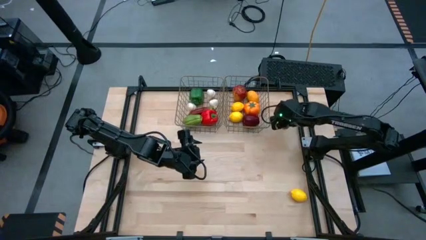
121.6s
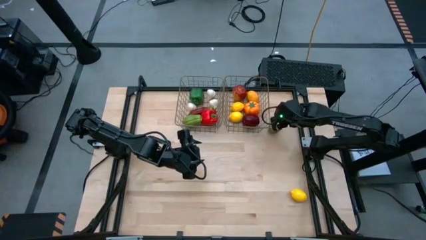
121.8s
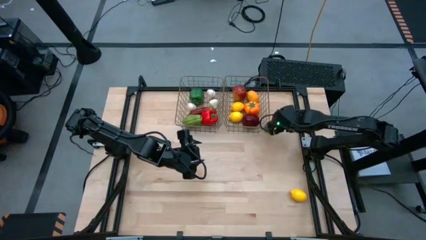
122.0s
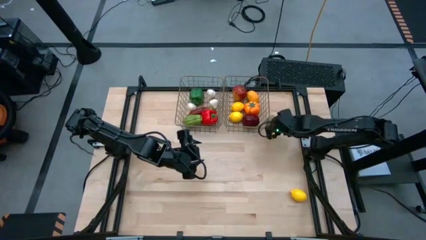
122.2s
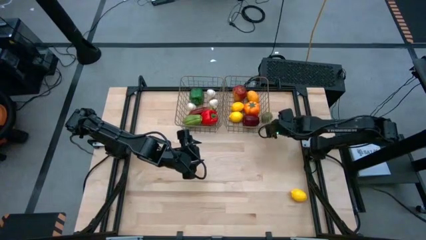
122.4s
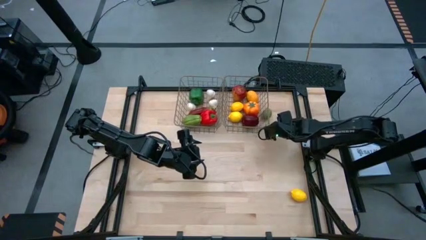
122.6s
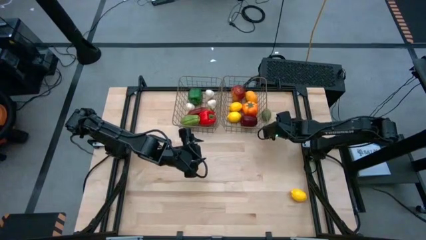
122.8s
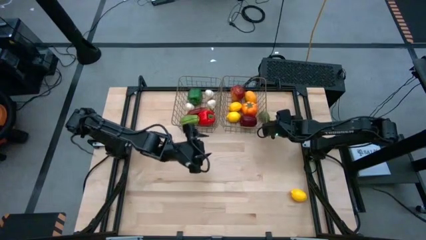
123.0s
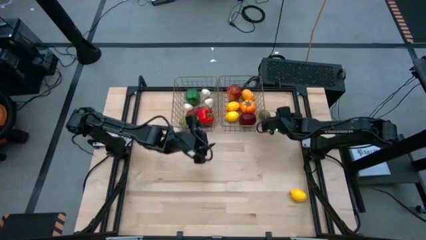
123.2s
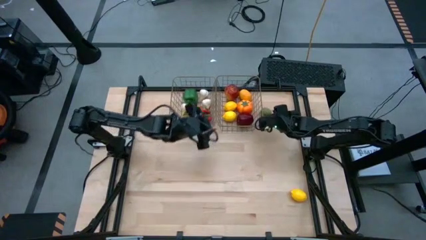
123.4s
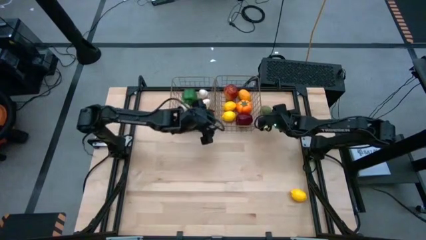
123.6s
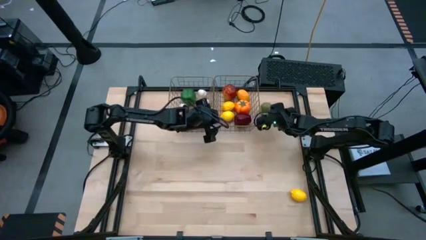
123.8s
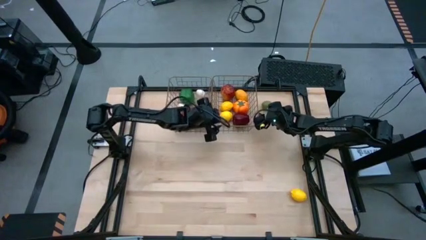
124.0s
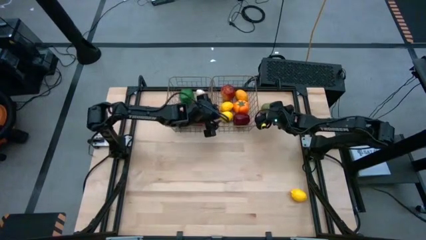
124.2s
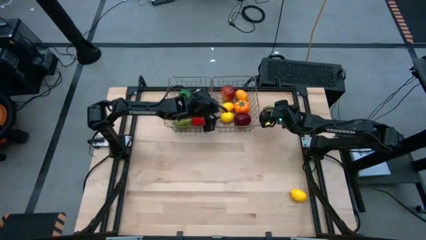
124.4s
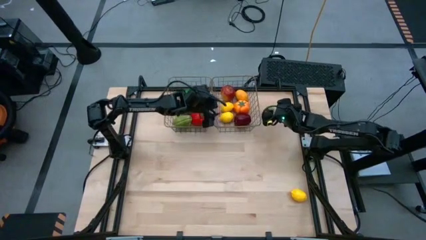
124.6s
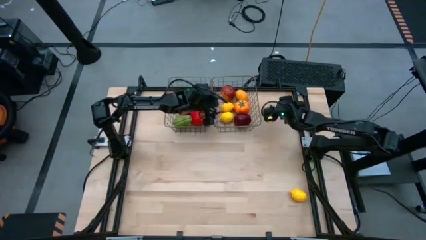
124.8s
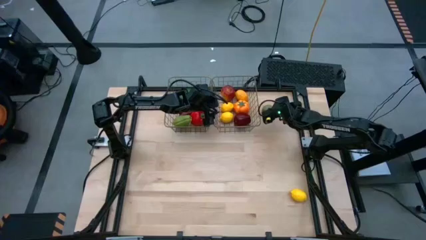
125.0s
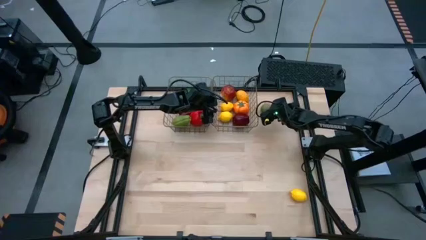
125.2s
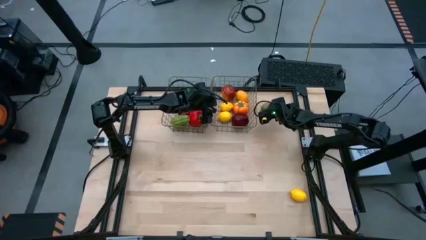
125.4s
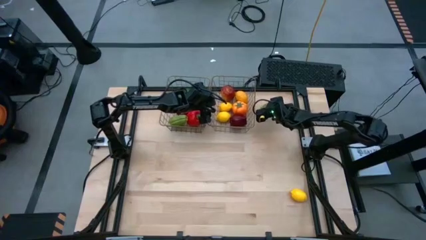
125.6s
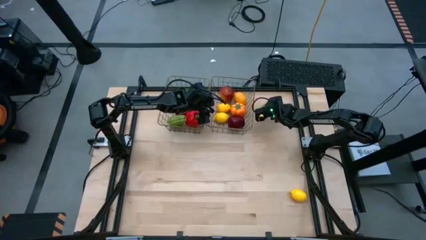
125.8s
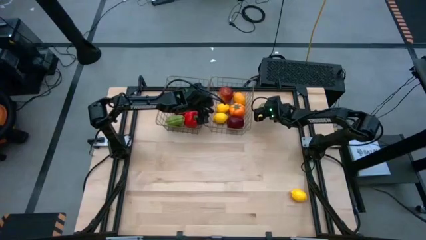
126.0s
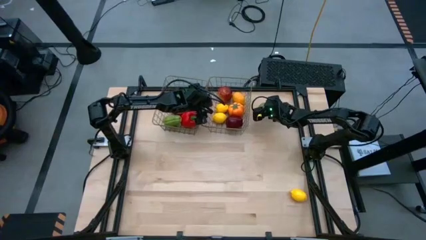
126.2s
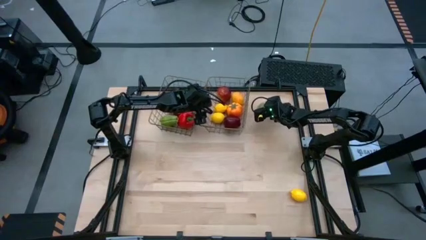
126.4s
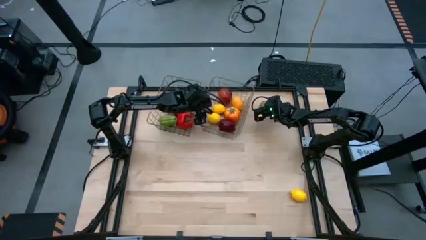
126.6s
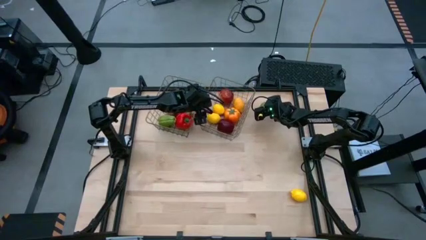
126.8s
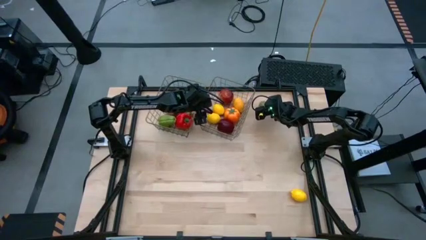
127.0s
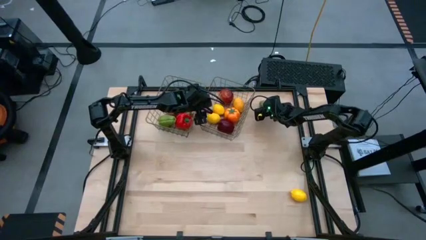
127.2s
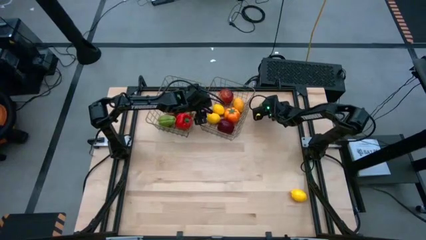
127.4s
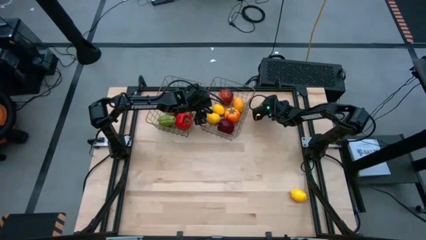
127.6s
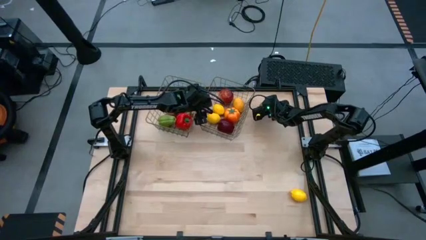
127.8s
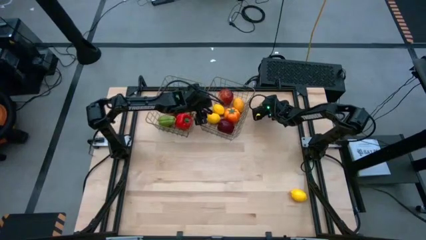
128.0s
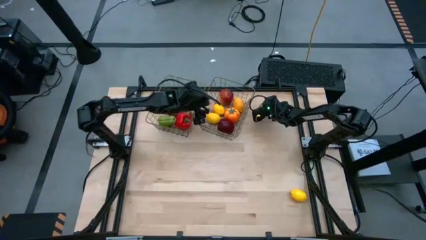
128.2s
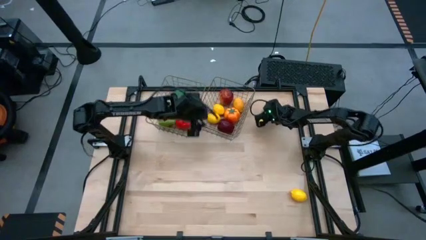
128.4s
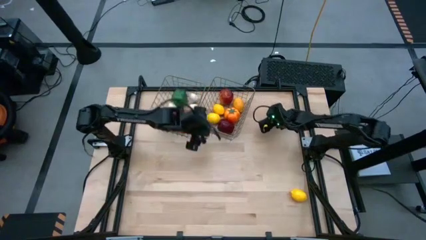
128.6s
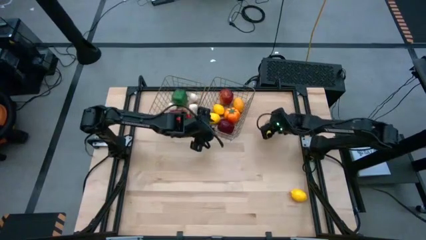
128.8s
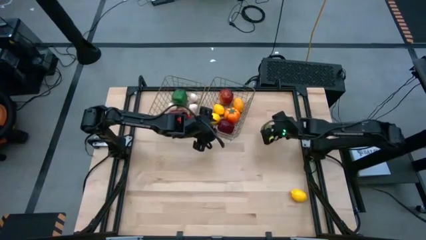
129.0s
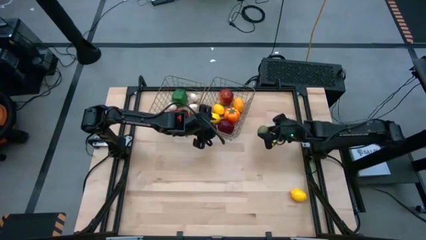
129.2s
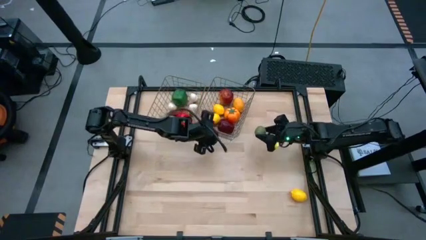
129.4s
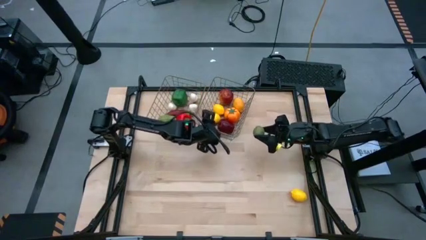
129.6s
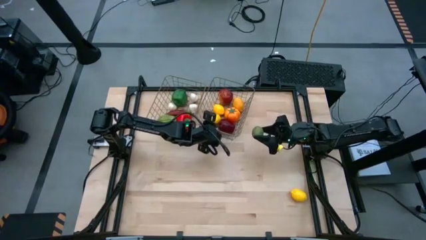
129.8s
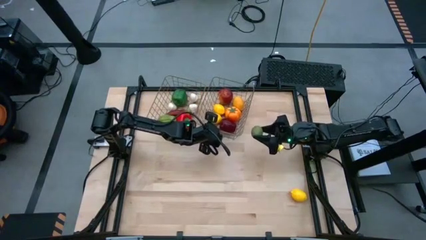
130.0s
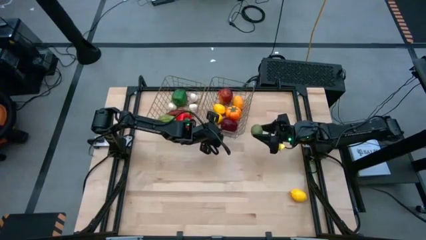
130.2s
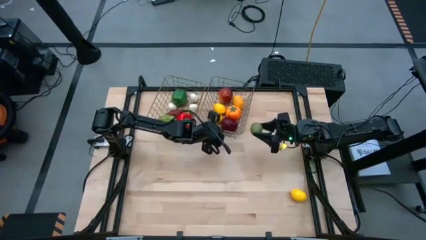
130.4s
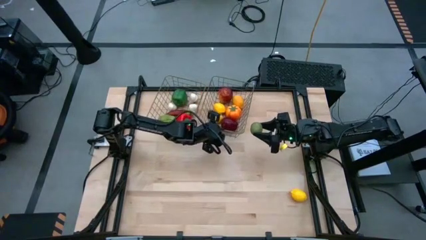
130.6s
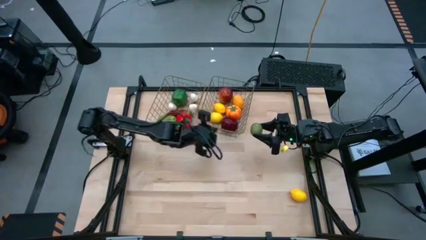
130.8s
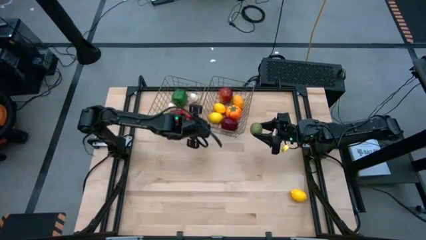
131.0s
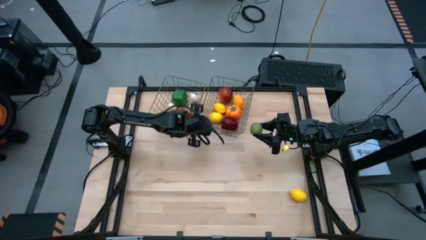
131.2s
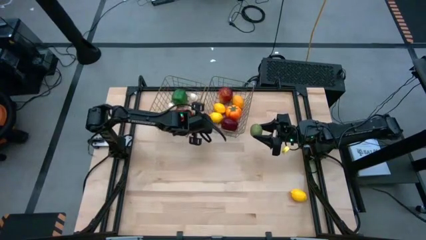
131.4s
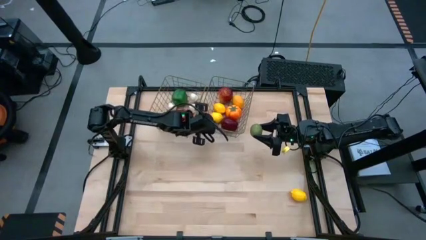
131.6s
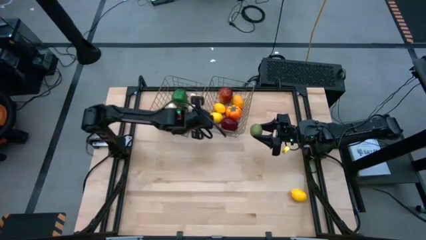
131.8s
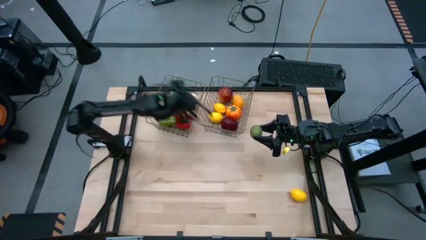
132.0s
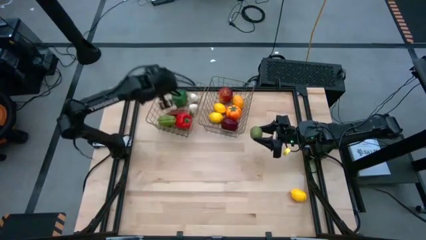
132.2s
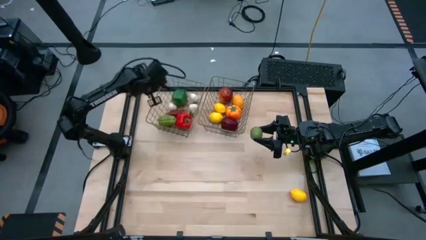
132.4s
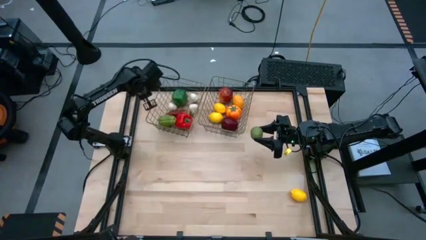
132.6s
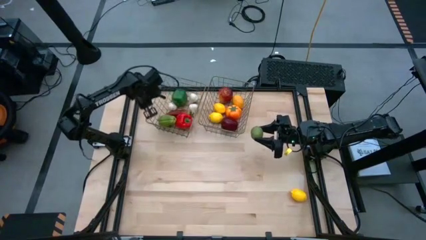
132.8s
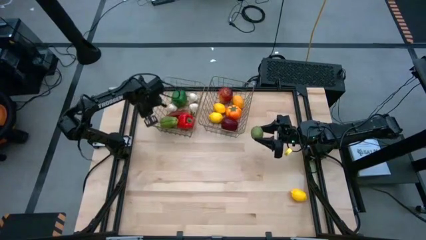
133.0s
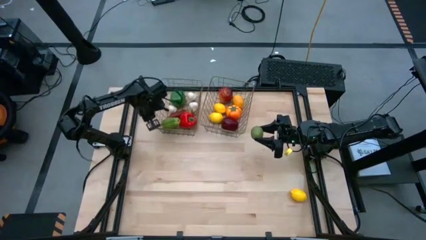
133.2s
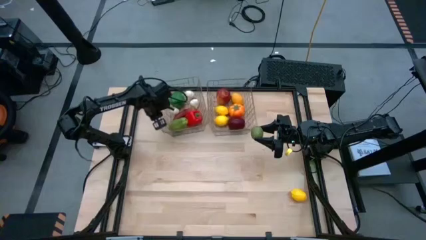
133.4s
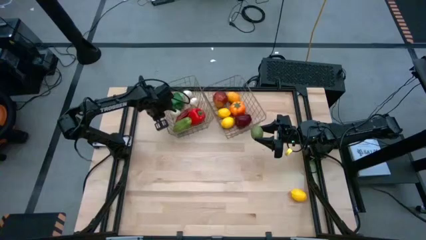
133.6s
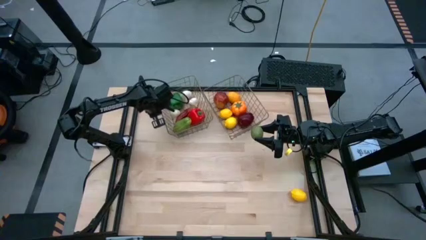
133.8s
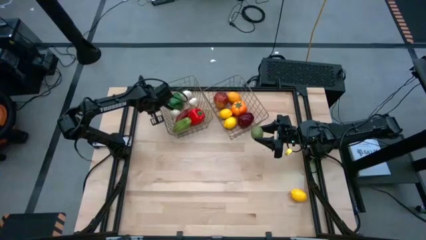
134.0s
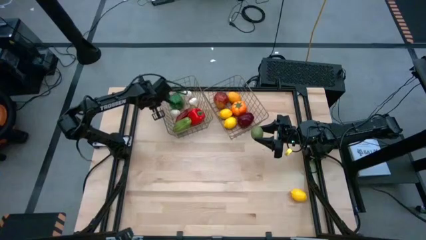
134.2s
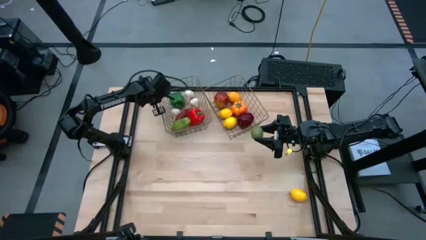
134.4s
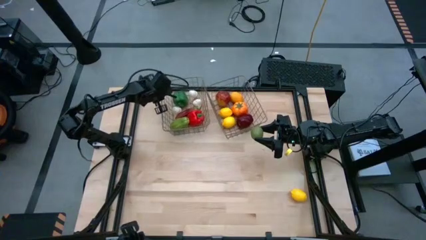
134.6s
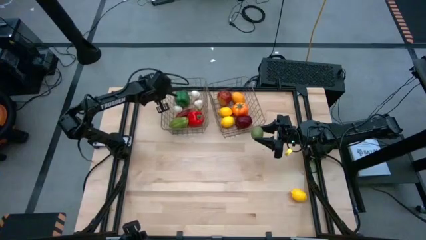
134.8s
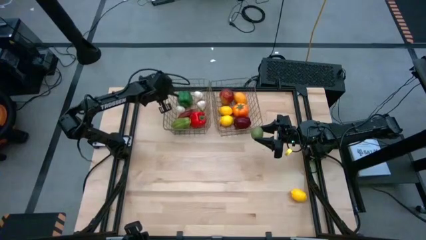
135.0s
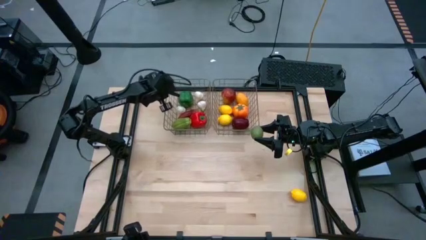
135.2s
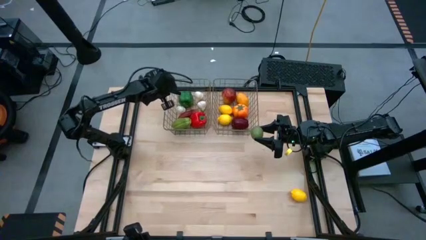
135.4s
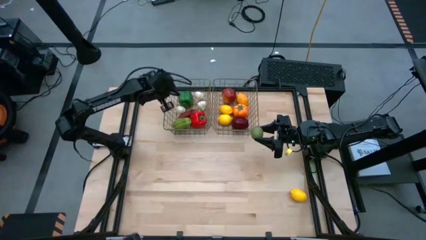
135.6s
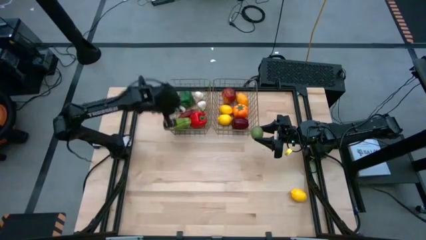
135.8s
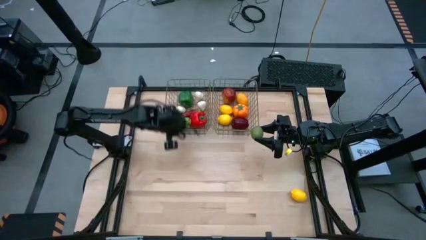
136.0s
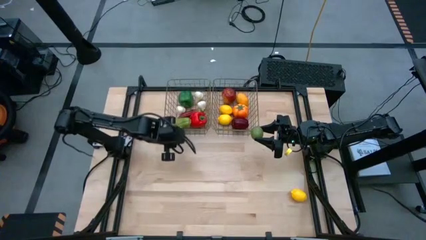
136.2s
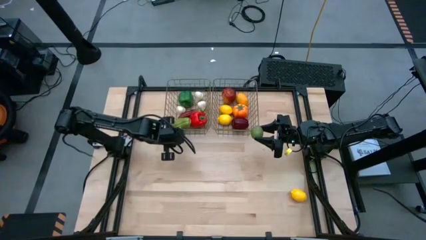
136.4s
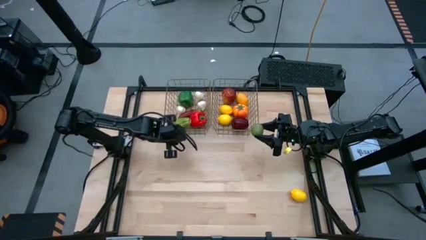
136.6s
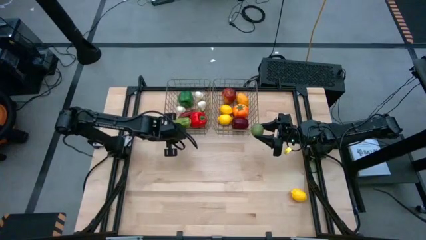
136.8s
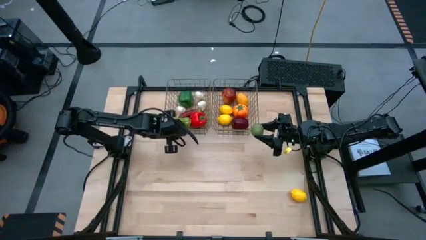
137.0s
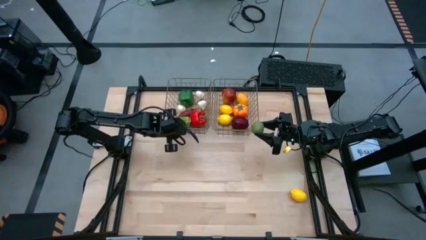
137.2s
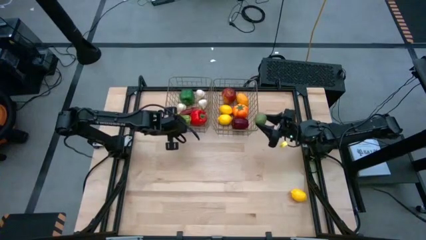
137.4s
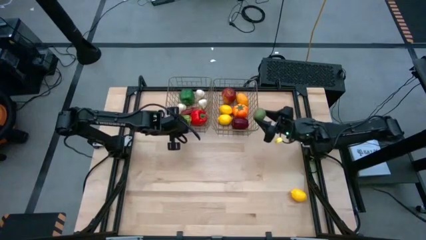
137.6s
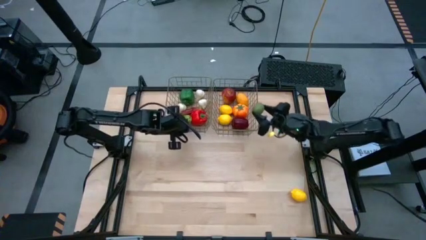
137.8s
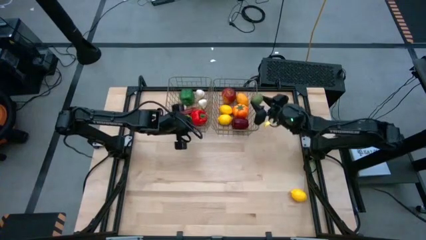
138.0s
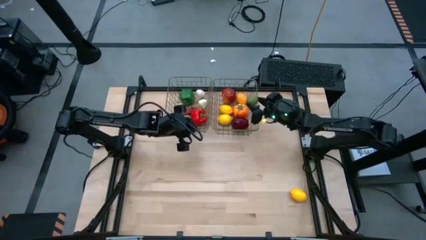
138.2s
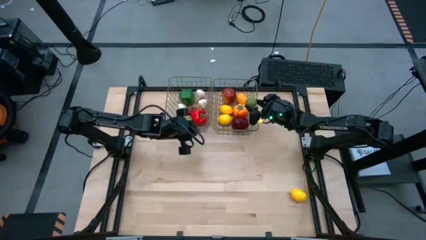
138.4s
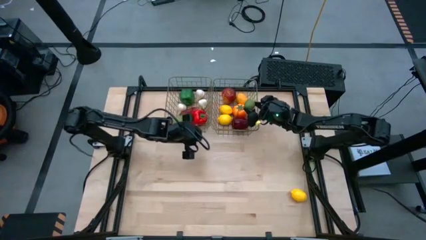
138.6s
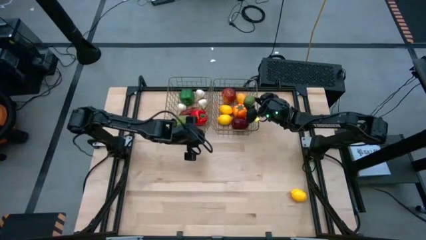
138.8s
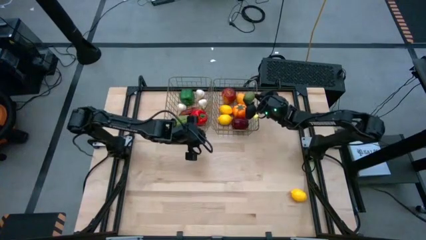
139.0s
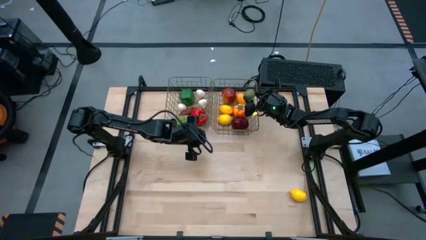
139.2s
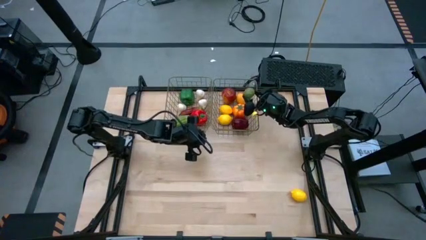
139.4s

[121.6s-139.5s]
Task: Sort produce into baskets
Put the green lemon into the right mesh basket
